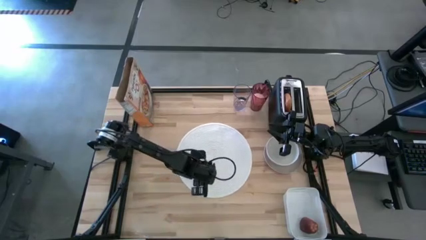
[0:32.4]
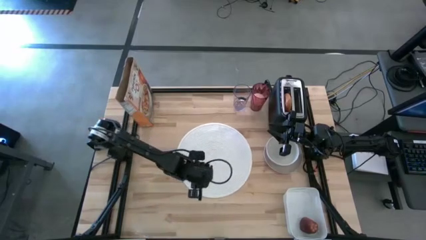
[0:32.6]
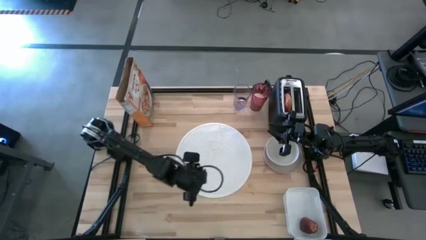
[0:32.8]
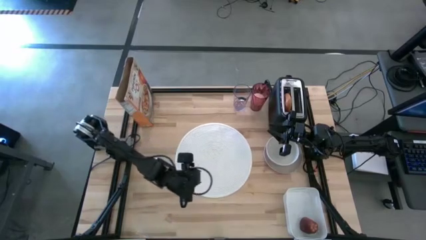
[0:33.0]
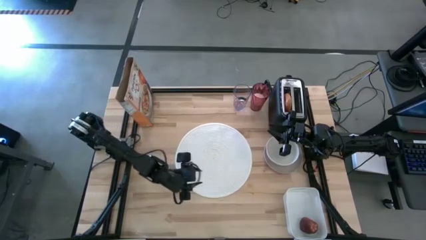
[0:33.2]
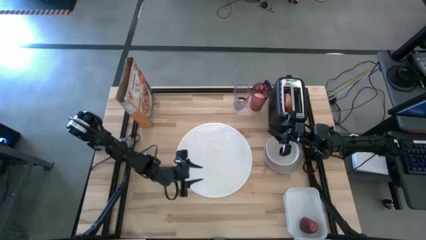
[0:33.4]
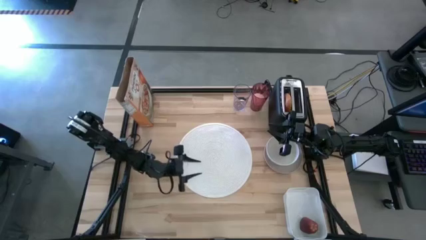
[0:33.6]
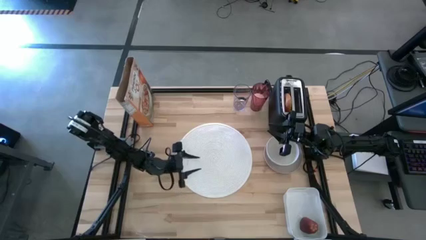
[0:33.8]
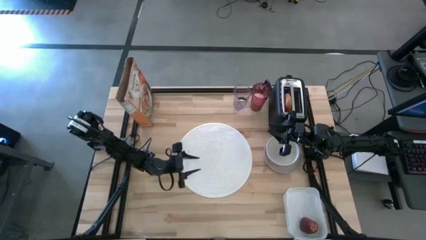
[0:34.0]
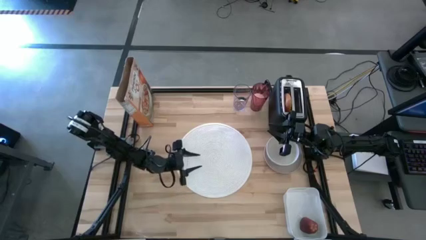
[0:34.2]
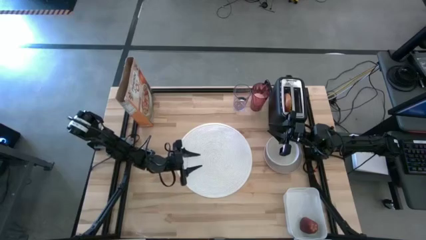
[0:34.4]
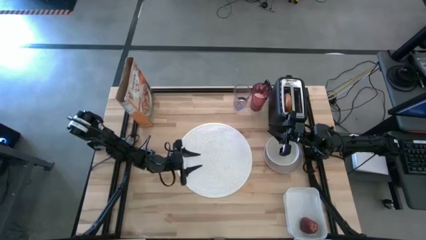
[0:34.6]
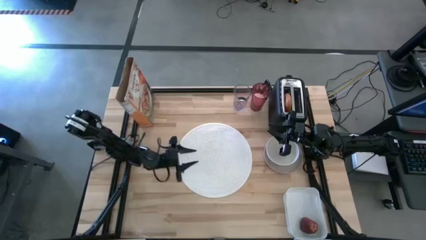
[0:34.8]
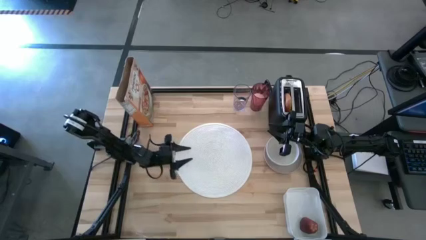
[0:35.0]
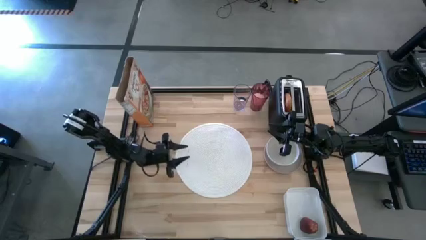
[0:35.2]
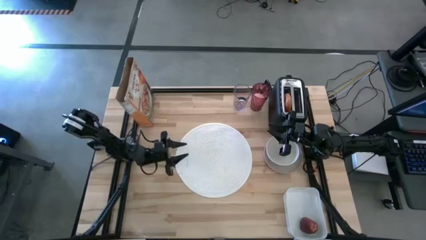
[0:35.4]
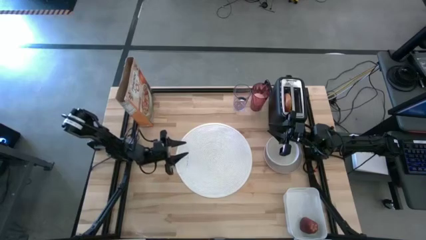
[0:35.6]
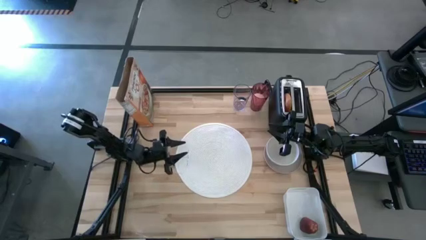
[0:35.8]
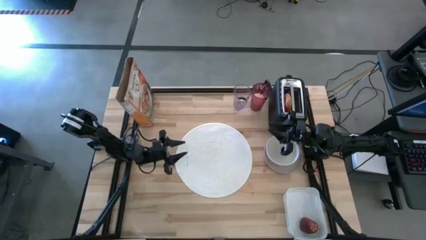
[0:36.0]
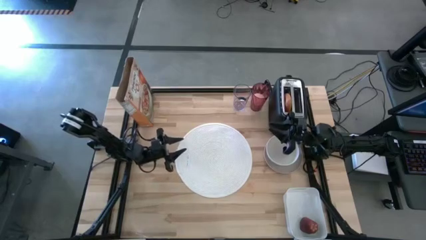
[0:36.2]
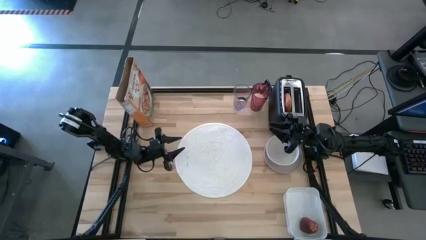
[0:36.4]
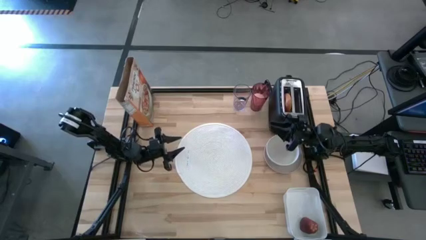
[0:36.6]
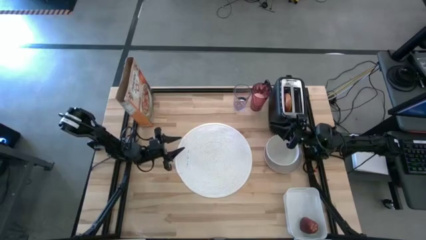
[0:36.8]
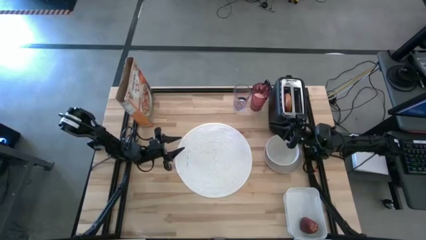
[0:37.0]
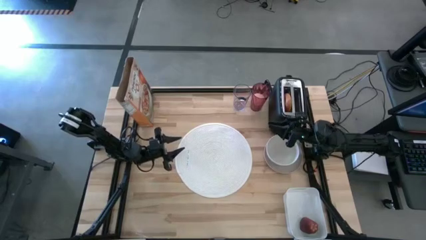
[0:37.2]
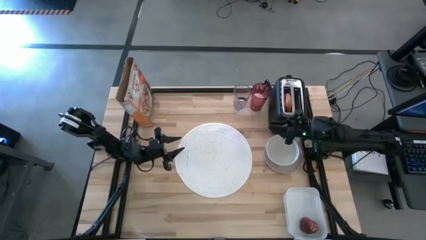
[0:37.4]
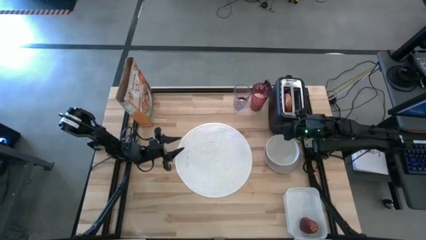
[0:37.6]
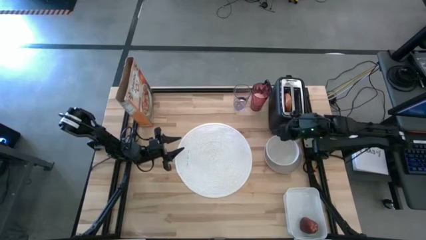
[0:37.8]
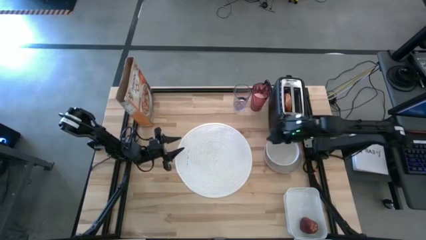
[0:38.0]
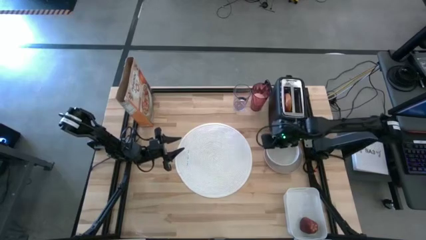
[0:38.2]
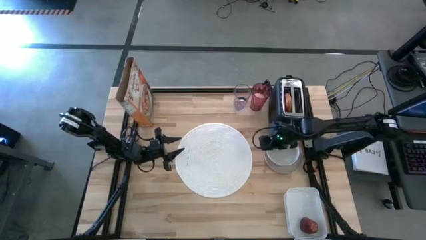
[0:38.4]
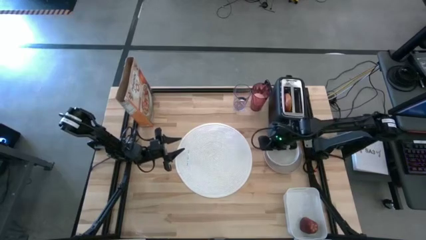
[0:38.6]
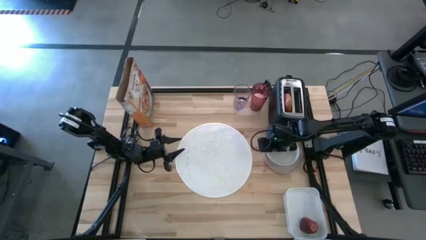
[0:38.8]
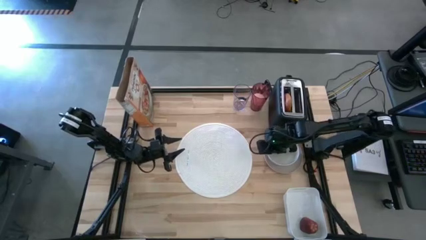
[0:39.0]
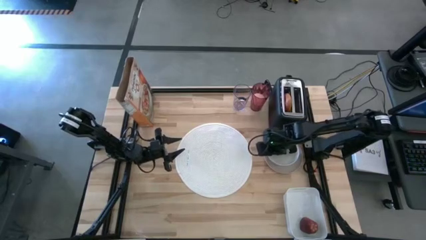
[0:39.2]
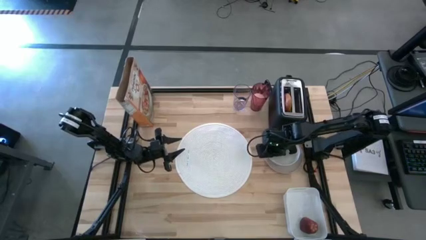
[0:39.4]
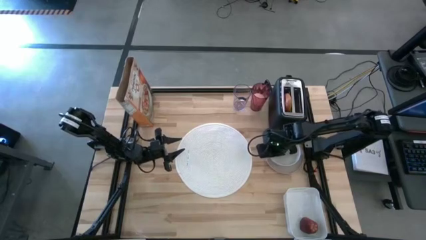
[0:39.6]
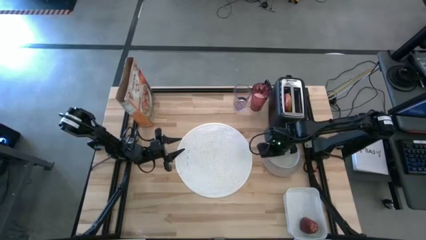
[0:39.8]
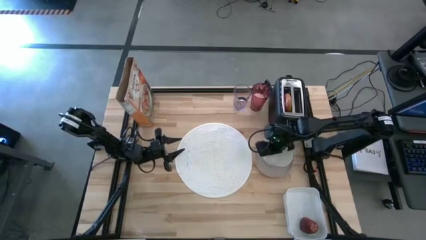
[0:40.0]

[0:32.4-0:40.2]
Task: Arrange a breakfast setting
Put the white bowl on the left of the white table mat

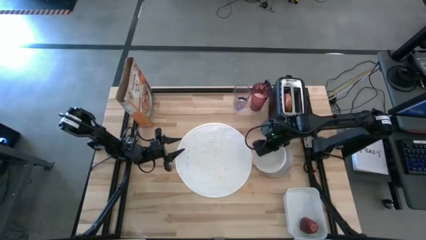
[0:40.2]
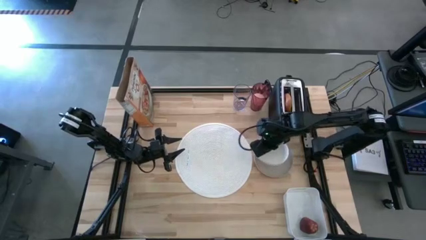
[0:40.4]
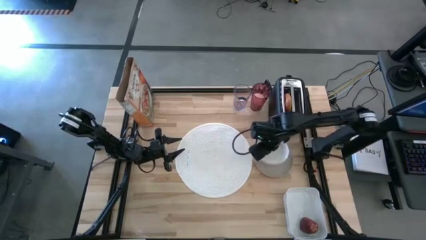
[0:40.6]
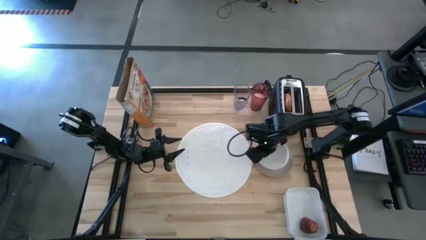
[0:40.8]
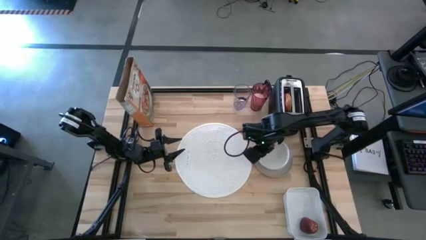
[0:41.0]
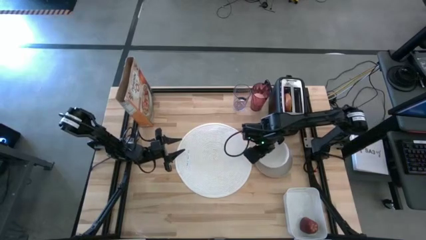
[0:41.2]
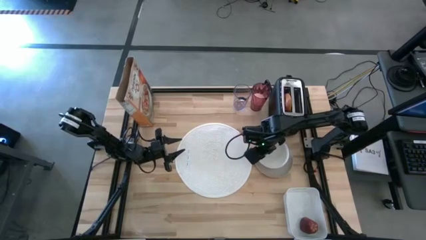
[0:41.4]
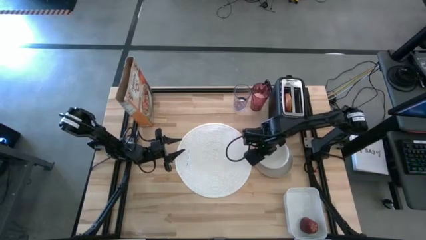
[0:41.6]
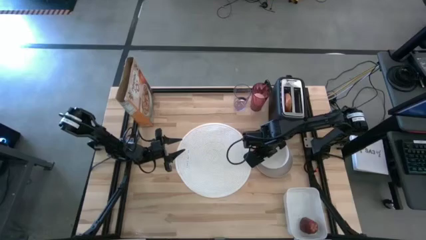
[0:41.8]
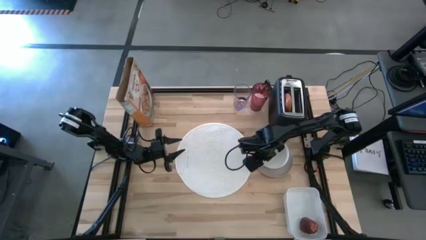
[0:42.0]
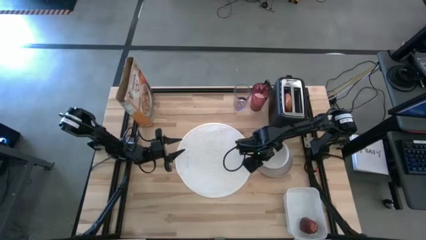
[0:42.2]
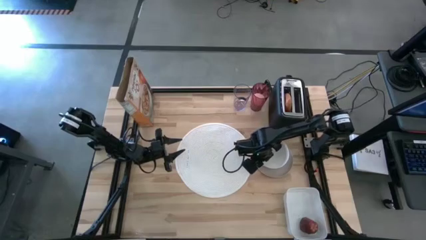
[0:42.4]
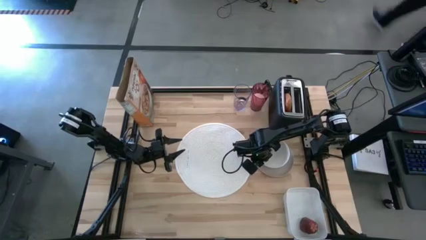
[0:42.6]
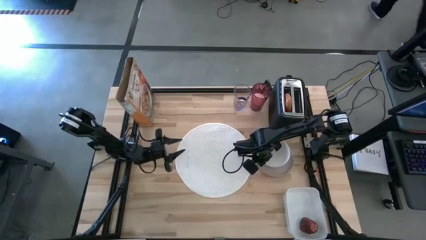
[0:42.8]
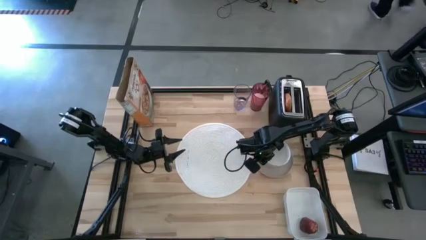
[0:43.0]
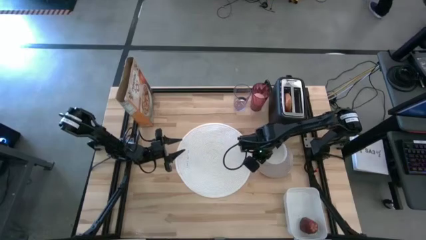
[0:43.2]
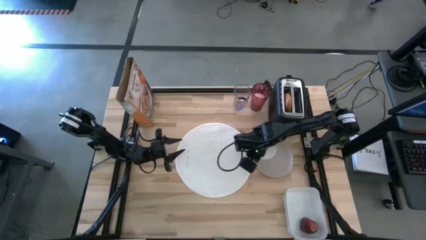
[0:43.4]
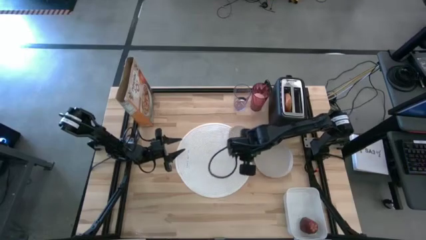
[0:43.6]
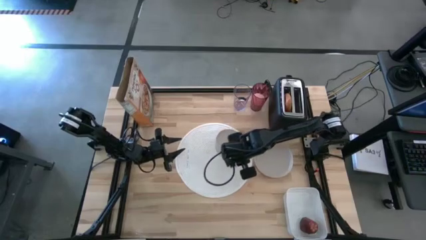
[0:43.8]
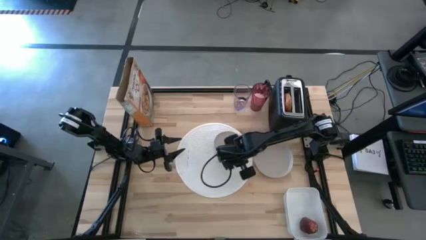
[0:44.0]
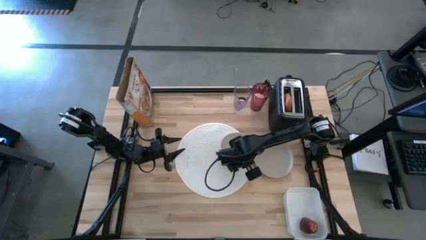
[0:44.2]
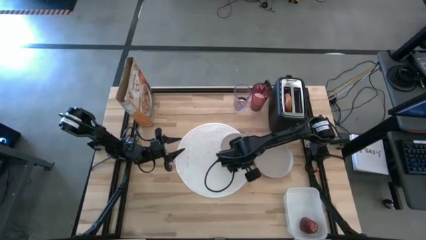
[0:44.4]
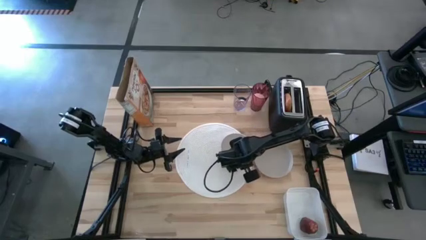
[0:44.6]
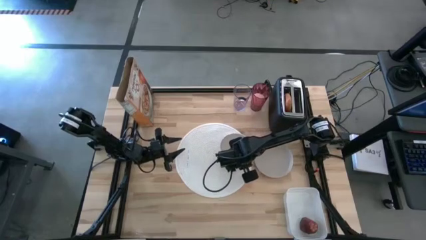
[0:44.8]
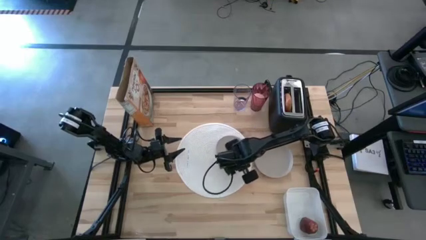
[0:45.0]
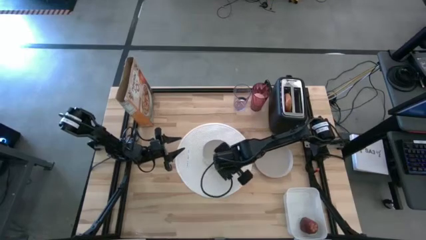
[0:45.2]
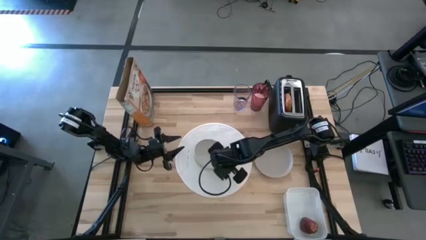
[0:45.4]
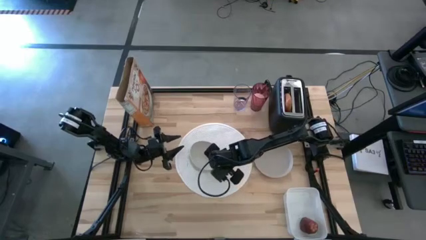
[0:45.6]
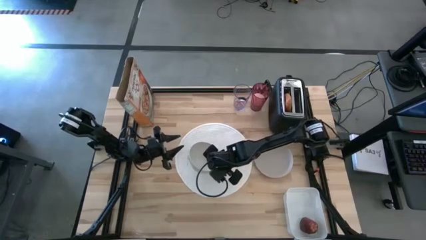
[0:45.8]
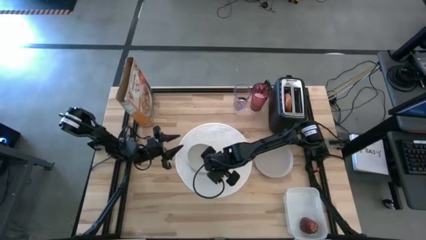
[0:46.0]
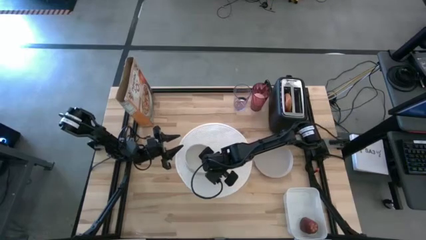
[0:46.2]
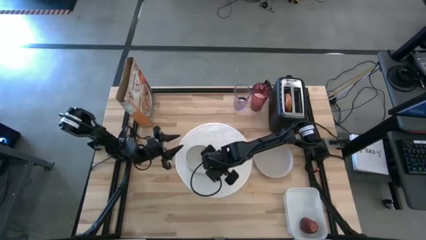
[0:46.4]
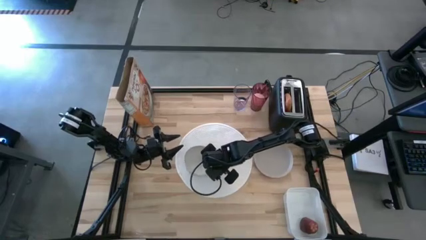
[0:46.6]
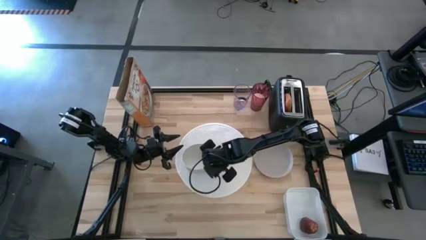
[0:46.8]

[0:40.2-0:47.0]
Put the white bowl on the left of the white table mat

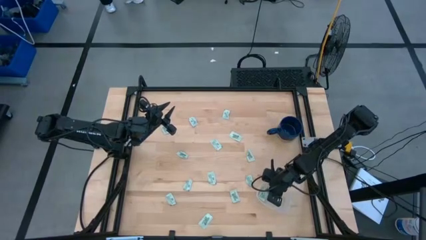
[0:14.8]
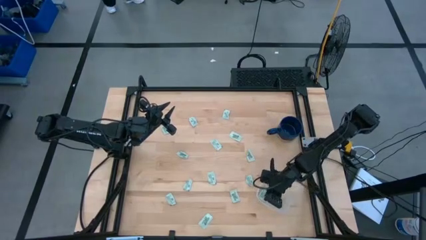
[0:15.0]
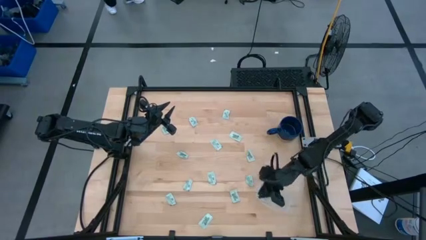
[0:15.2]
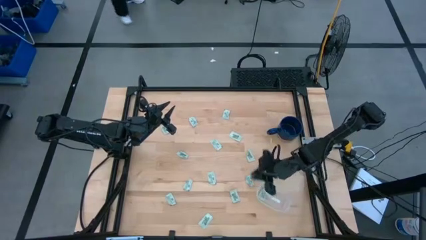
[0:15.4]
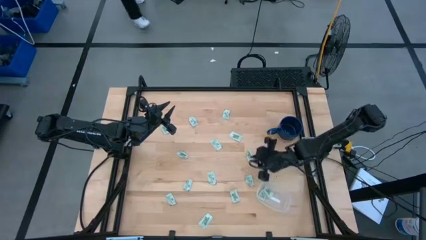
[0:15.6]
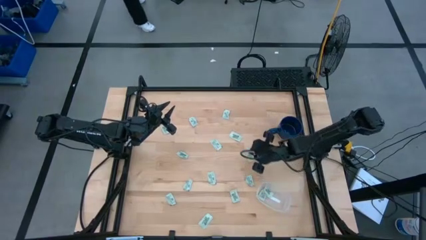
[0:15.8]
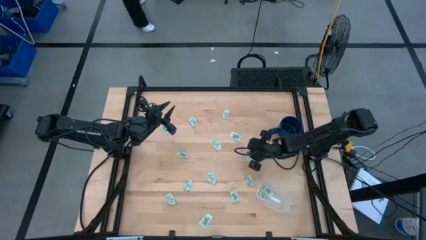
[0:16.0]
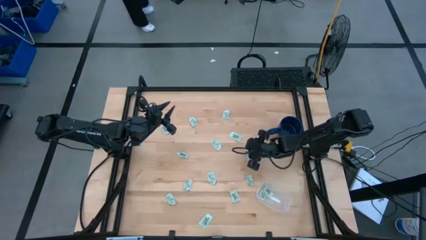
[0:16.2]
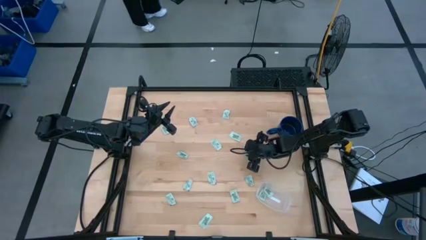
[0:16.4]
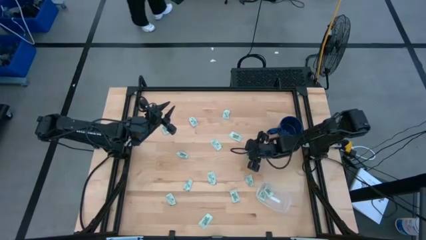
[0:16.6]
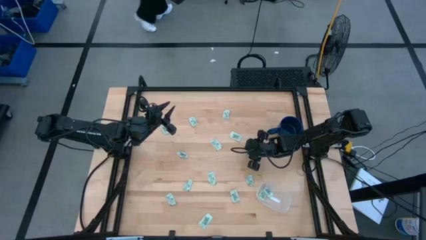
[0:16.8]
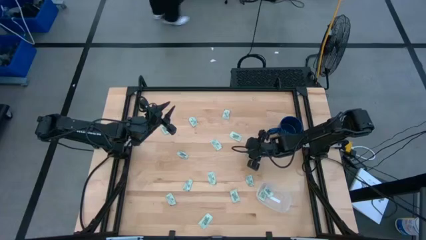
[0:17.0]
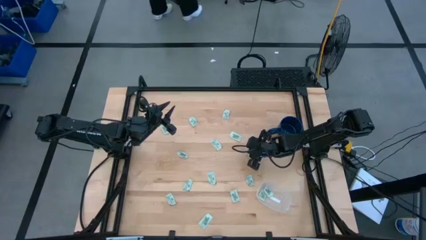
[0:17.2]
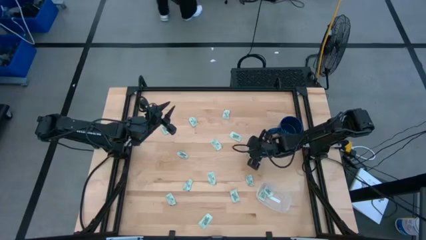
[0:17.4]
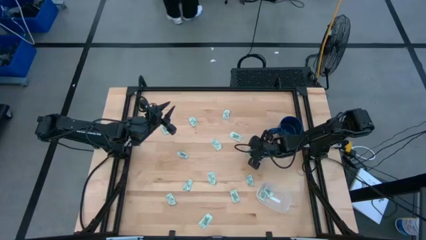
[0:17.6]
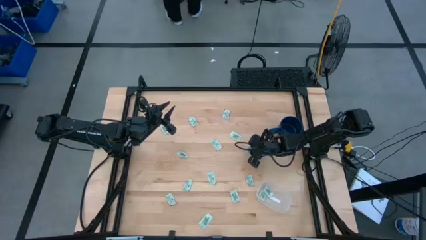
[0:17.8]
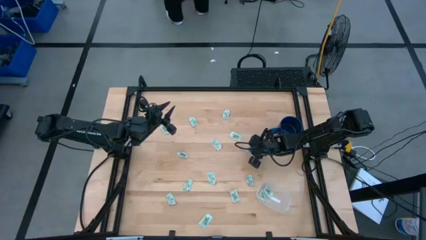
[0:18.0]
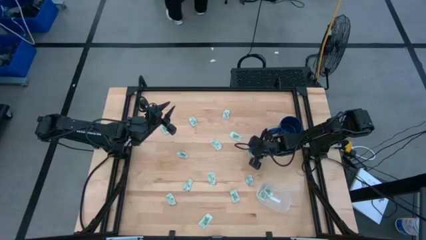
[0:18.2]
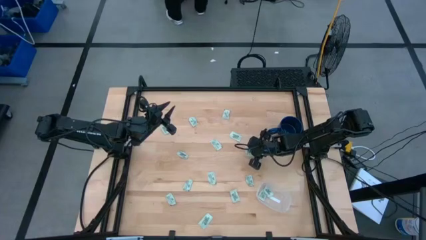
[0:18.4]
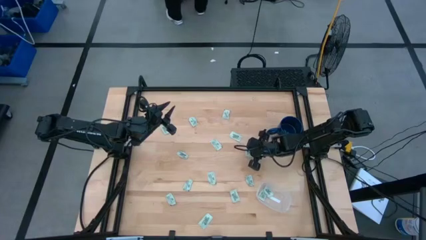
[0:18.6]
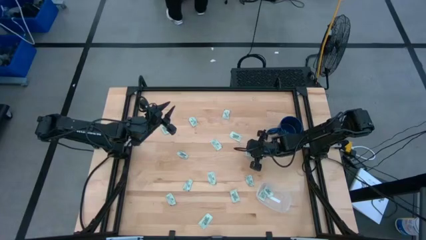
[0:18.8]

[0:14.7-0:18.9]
Task: Pick and place Stevia / Truvia into bins
Put the stevia packet into the transparent container
